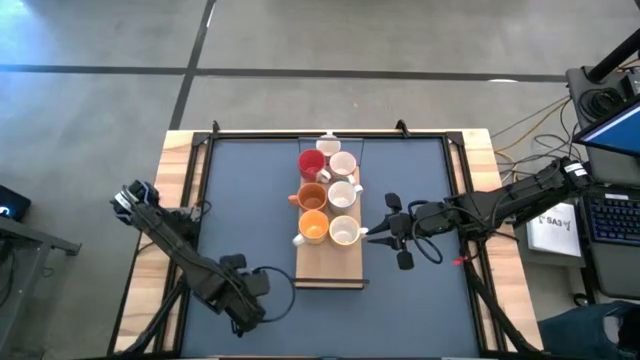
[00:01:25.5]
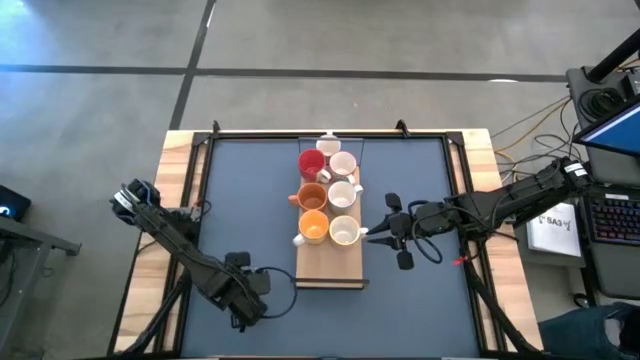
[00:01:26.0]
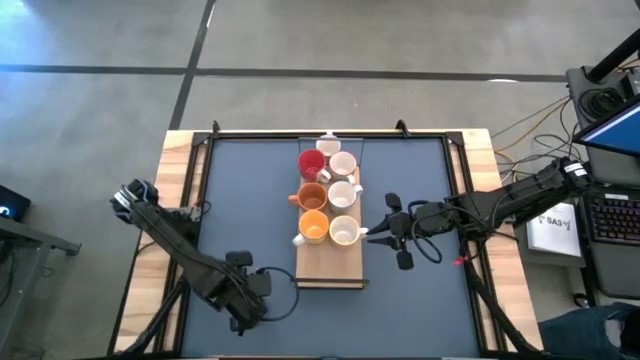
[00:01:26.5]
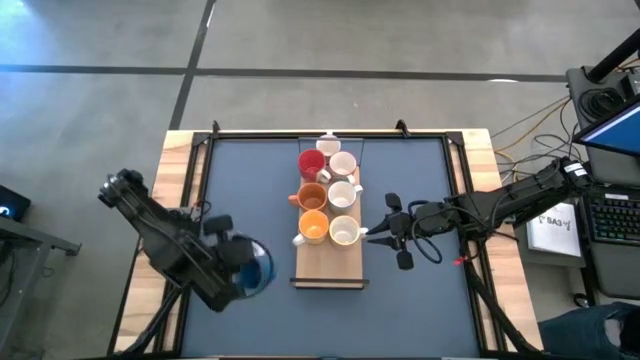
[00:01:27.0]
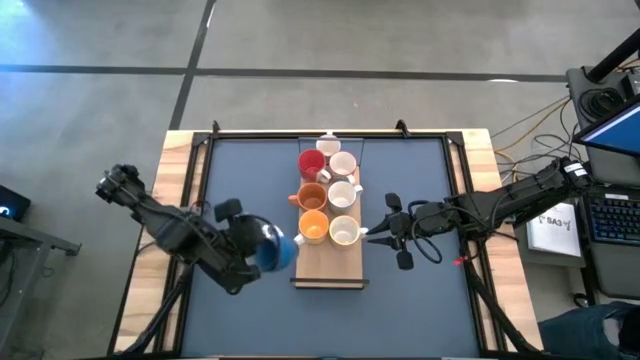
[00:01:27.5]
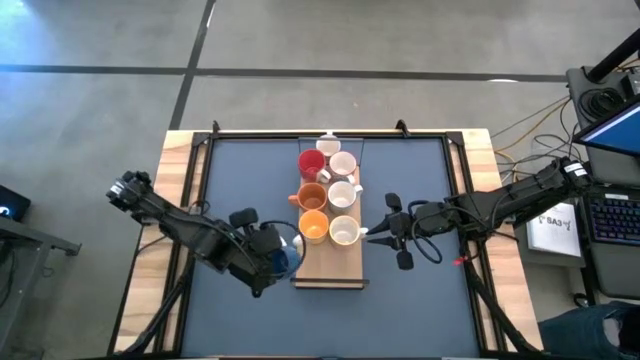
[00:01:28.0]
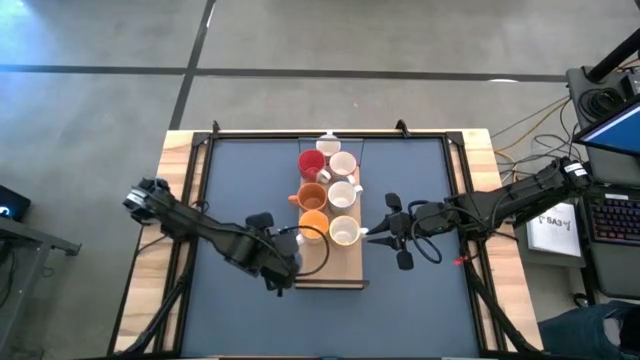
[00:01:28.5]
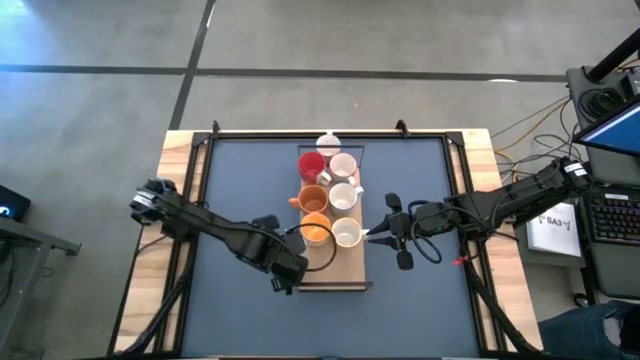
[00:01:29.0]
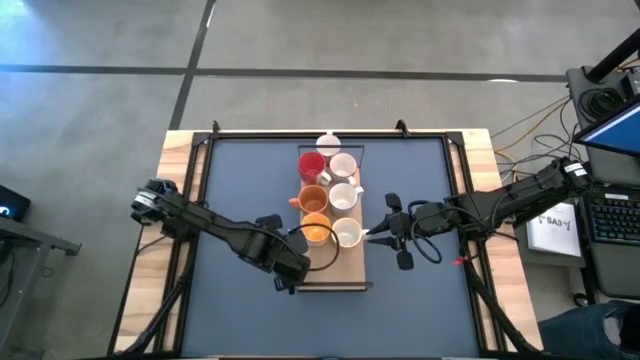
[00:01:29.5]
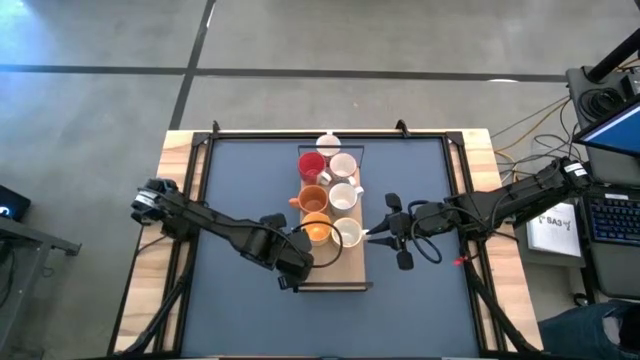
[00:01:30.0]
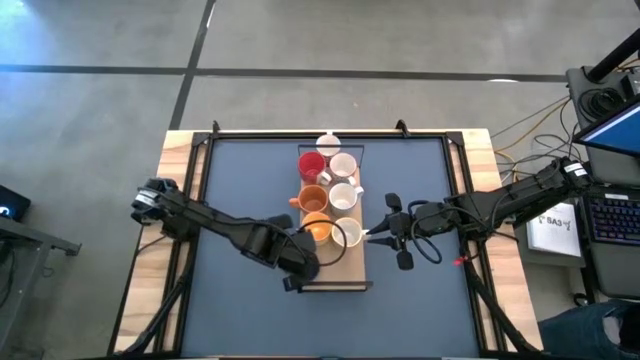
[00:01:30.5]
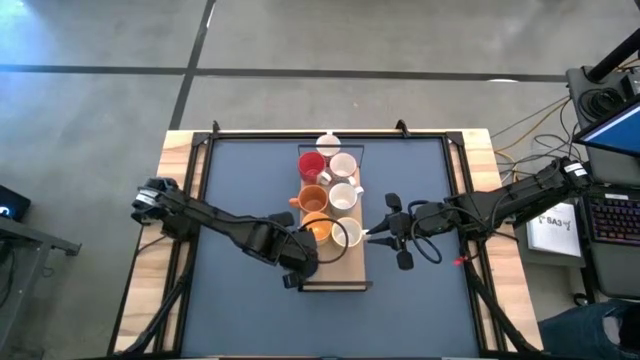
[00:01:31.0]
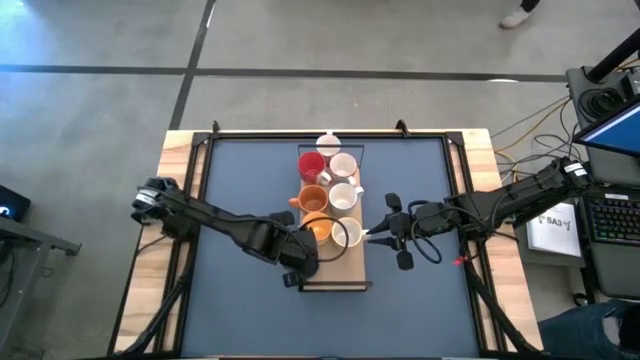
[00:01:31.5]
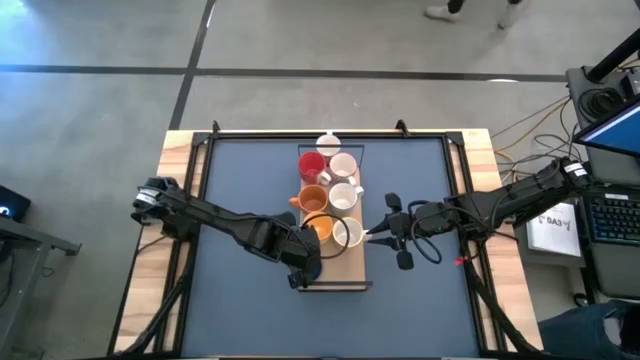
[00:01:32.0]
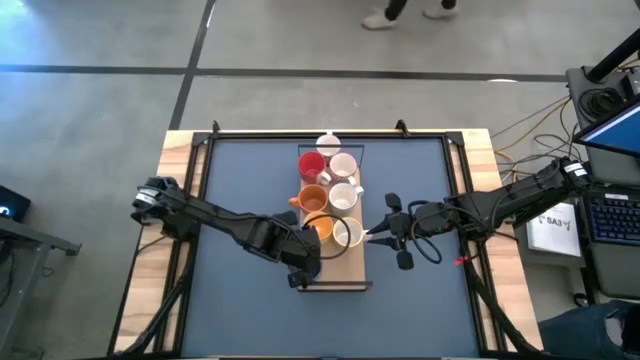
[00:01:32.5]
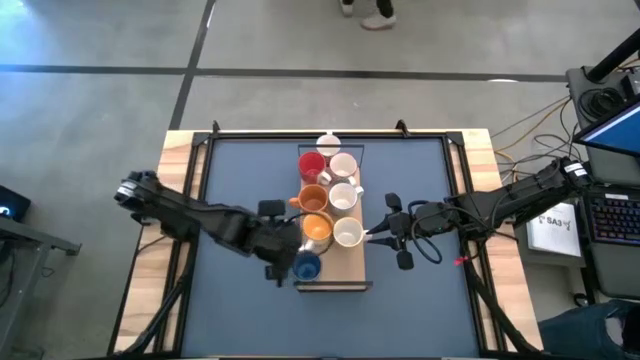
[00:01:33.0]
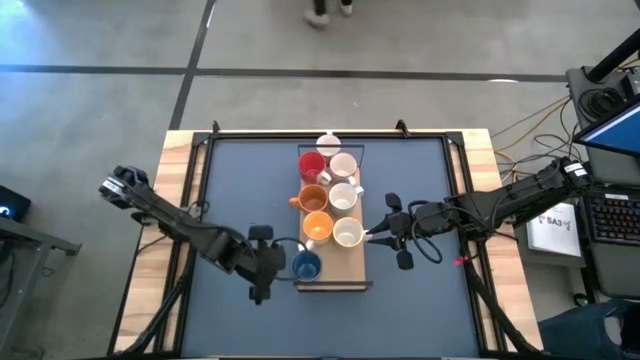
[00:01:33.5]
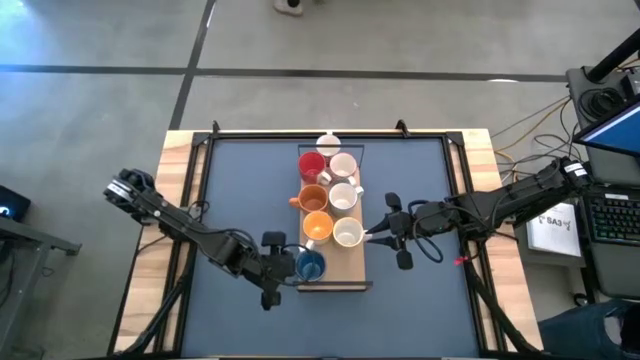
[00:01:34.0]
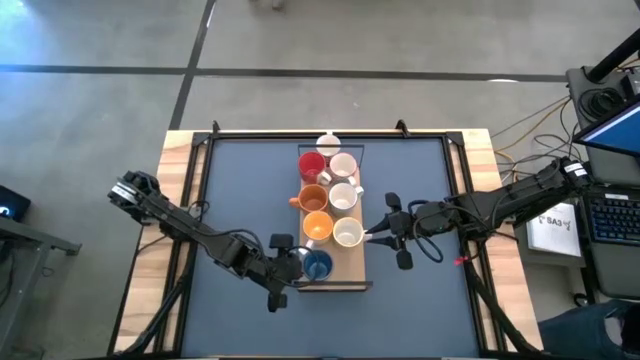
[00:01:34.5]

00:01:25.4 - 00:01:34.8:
Task: Place coffee mugs
Put the blue mug on the shelf
